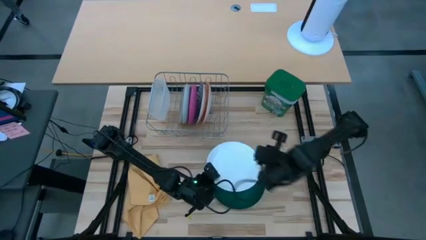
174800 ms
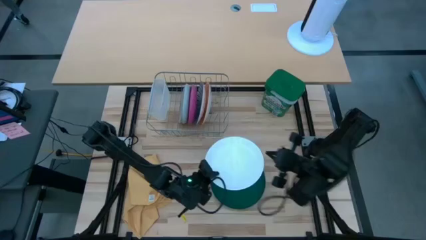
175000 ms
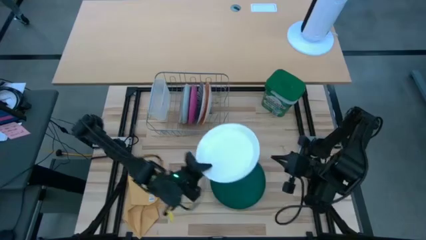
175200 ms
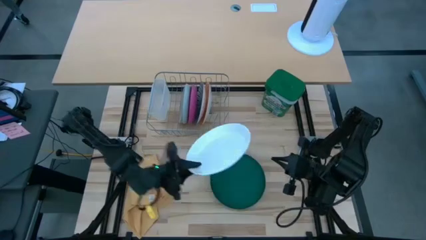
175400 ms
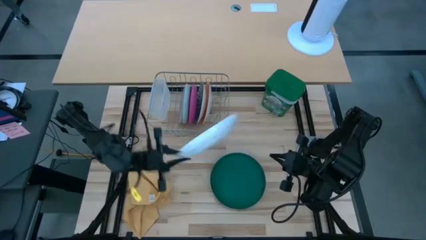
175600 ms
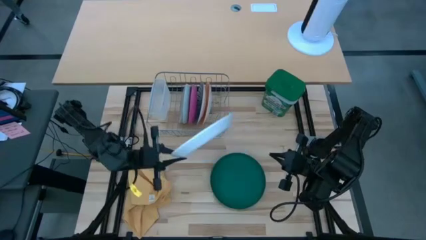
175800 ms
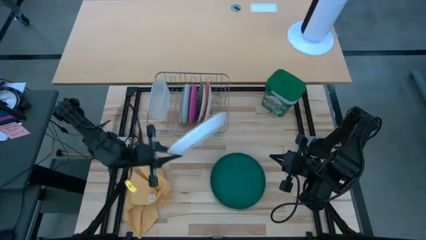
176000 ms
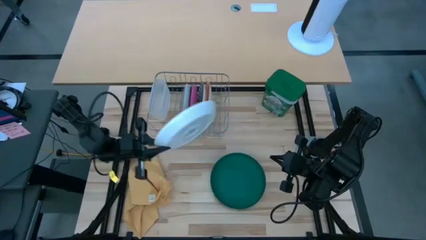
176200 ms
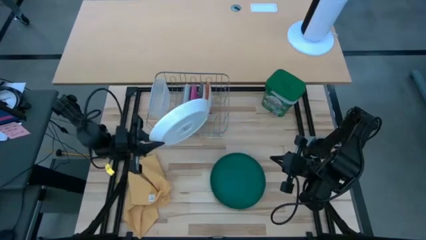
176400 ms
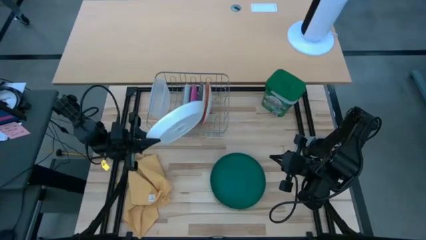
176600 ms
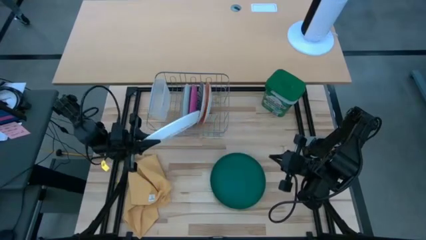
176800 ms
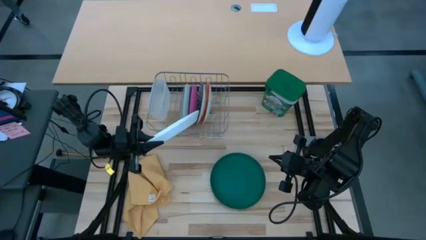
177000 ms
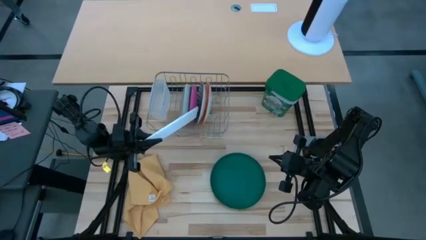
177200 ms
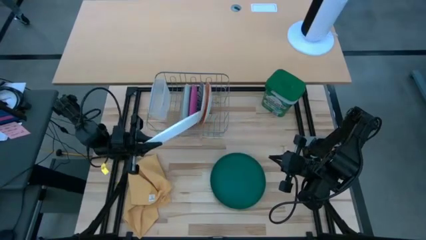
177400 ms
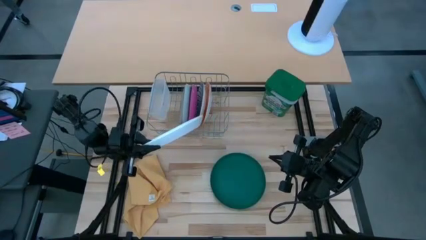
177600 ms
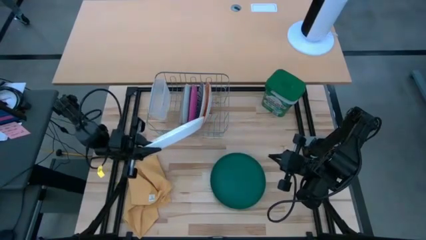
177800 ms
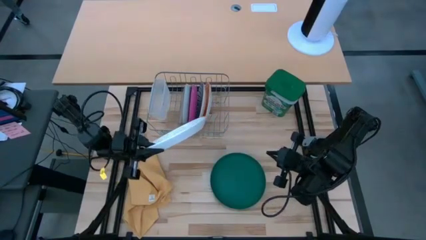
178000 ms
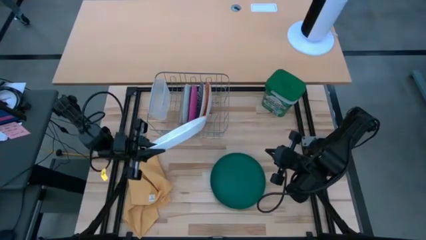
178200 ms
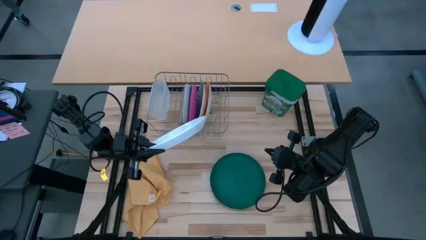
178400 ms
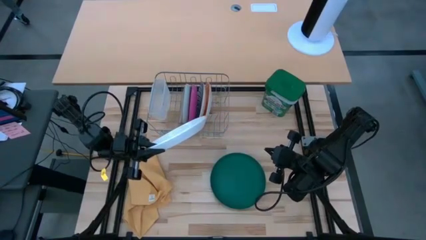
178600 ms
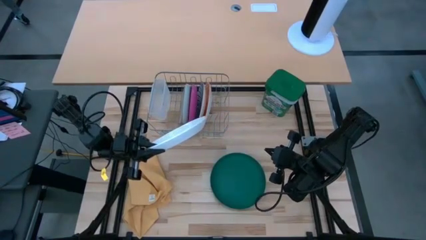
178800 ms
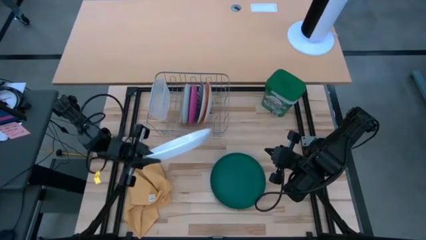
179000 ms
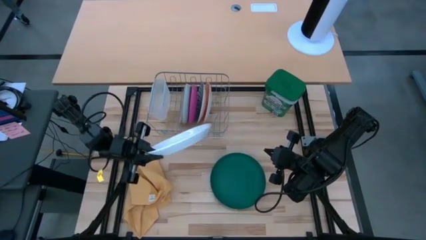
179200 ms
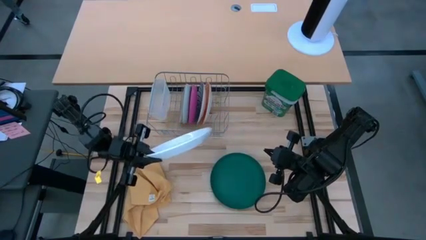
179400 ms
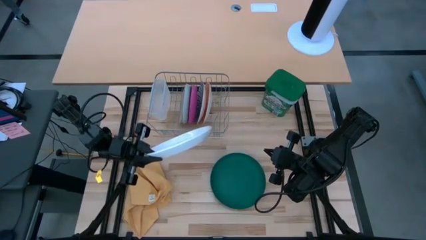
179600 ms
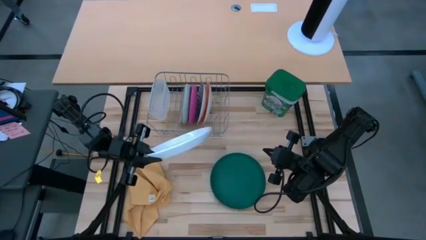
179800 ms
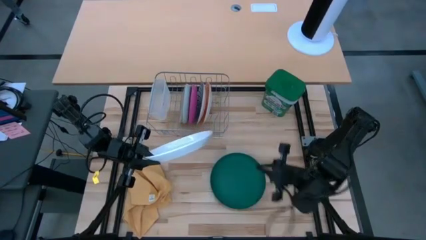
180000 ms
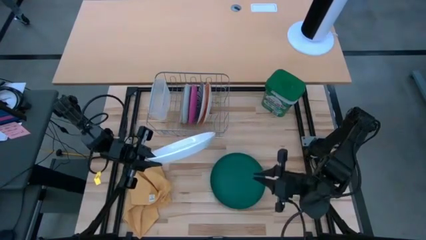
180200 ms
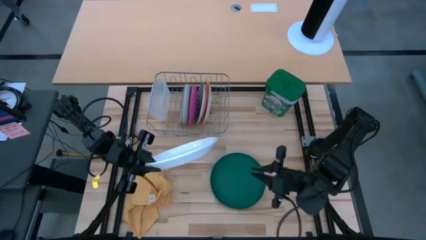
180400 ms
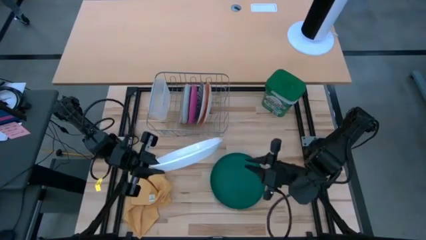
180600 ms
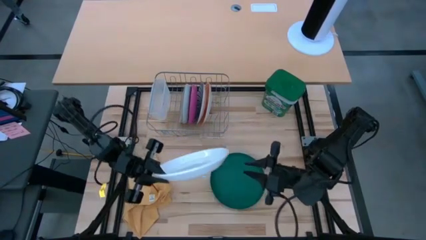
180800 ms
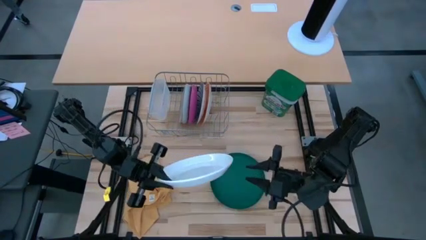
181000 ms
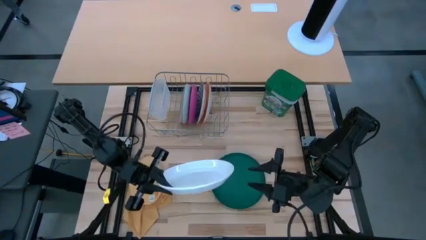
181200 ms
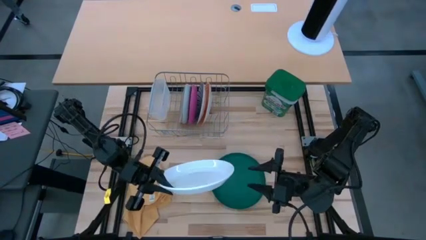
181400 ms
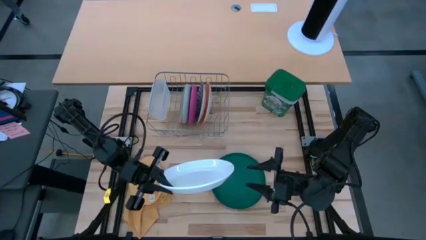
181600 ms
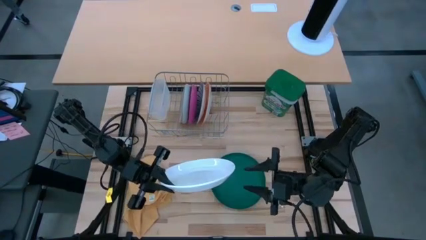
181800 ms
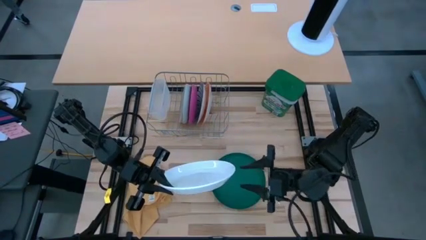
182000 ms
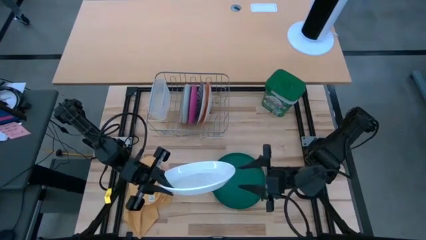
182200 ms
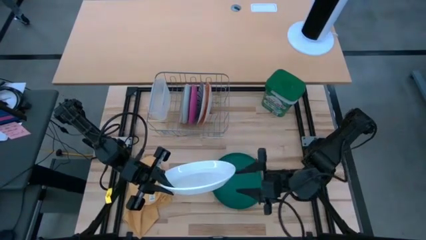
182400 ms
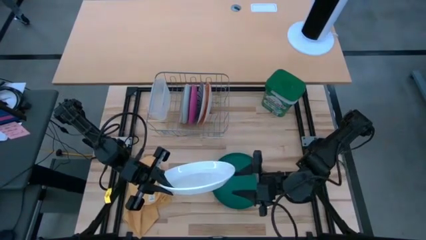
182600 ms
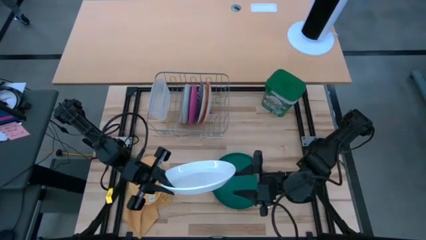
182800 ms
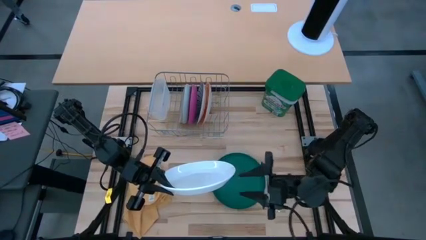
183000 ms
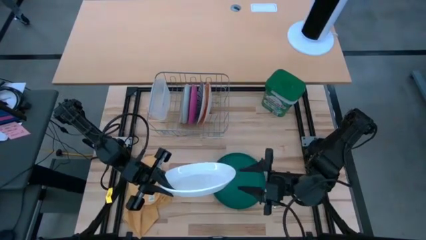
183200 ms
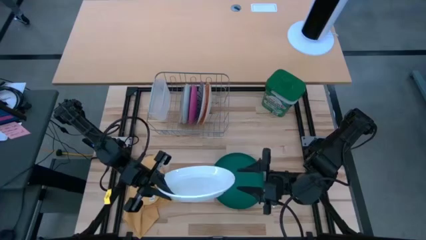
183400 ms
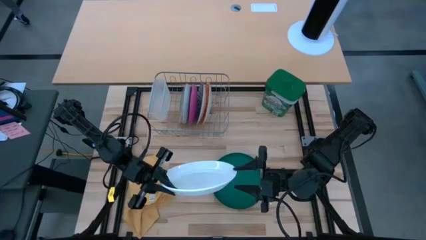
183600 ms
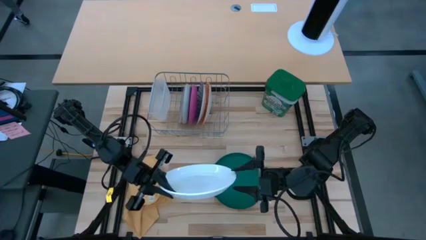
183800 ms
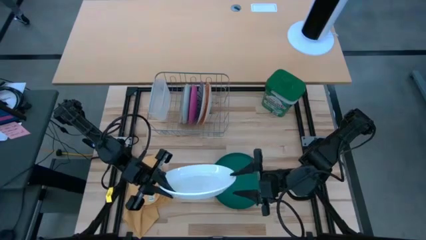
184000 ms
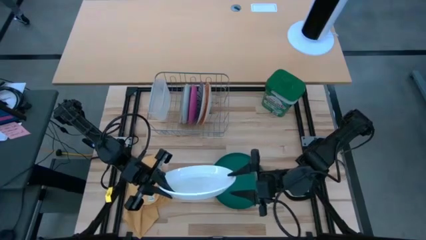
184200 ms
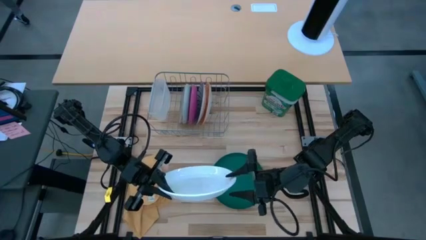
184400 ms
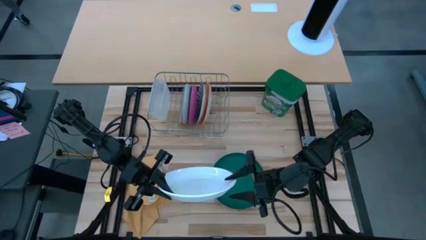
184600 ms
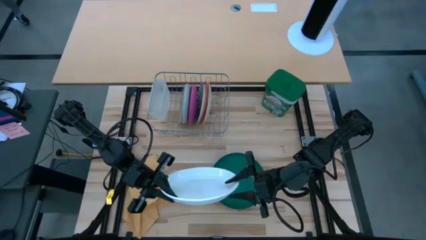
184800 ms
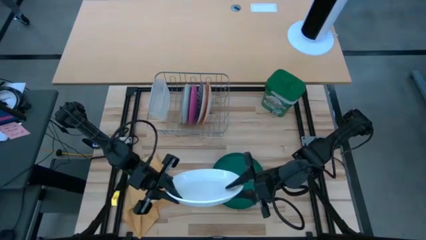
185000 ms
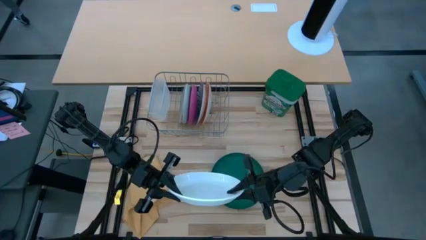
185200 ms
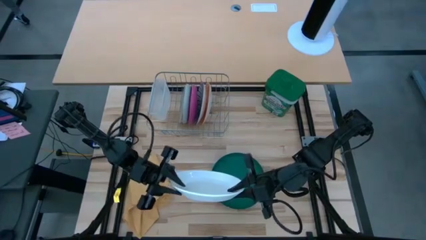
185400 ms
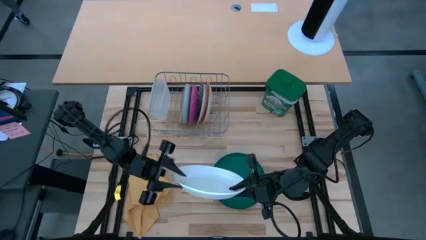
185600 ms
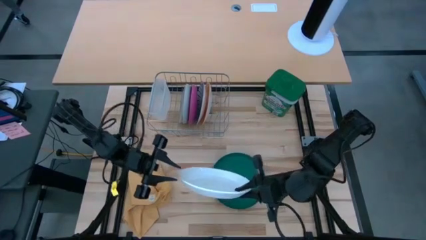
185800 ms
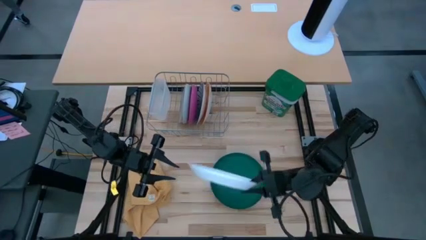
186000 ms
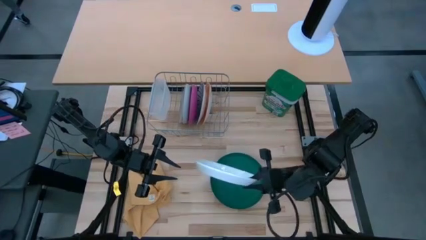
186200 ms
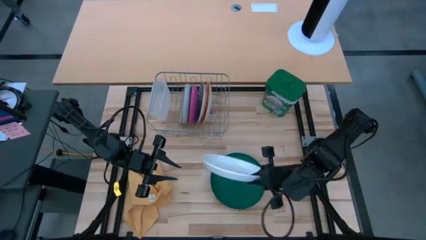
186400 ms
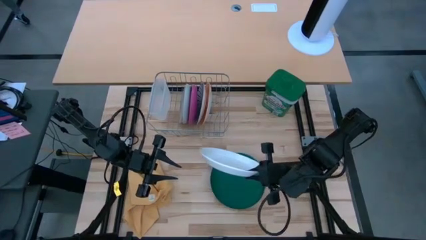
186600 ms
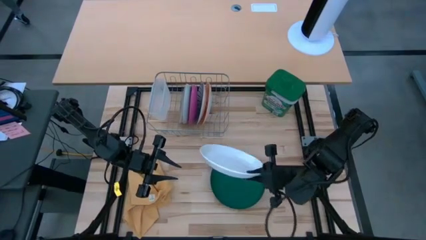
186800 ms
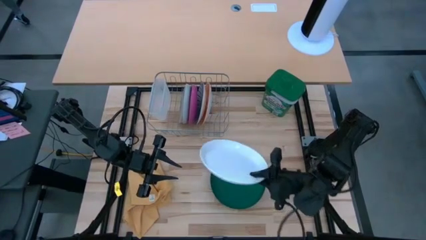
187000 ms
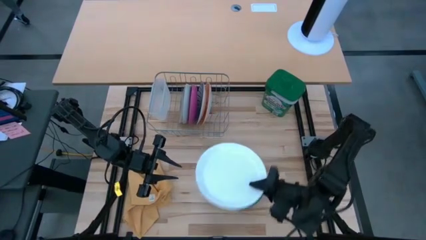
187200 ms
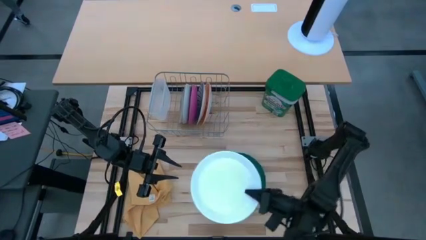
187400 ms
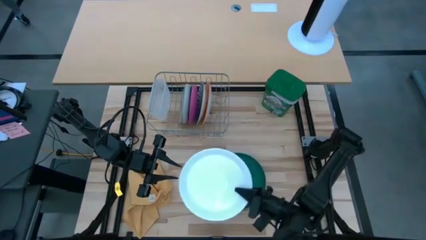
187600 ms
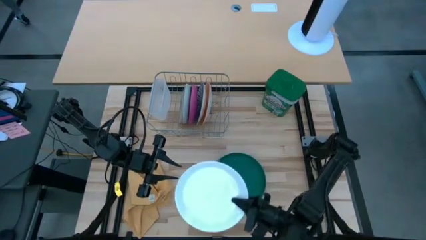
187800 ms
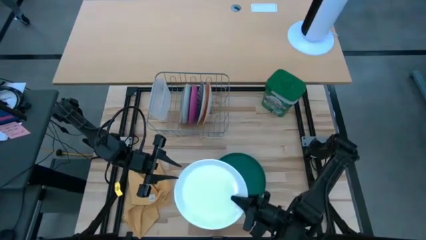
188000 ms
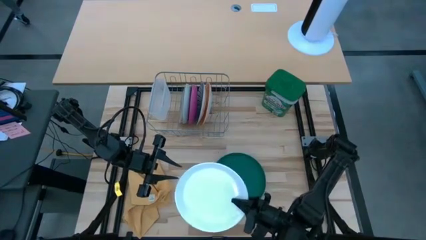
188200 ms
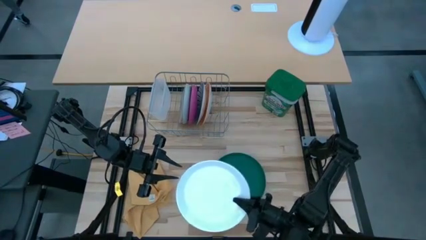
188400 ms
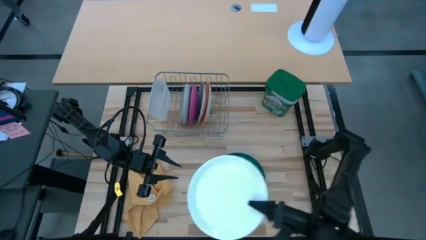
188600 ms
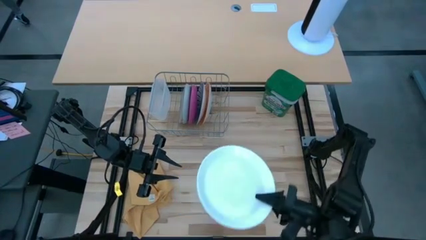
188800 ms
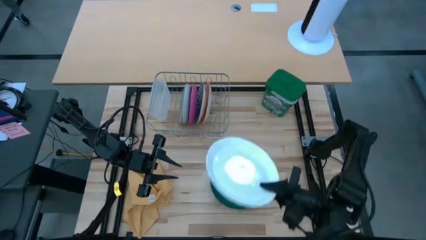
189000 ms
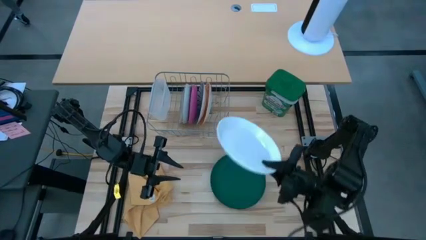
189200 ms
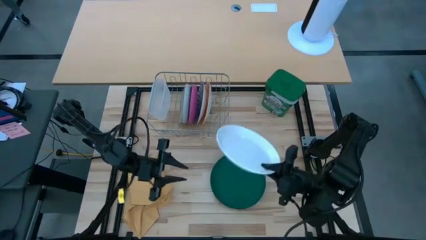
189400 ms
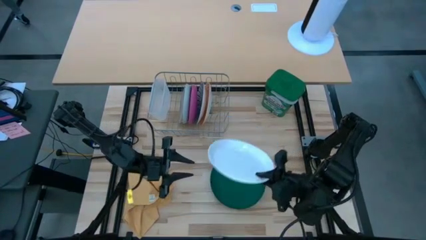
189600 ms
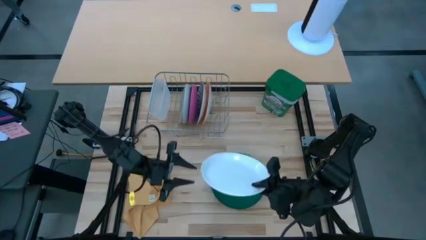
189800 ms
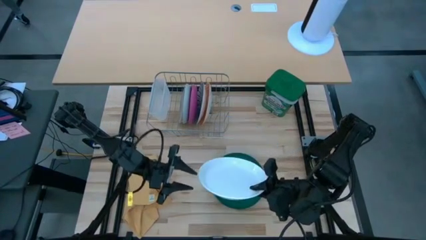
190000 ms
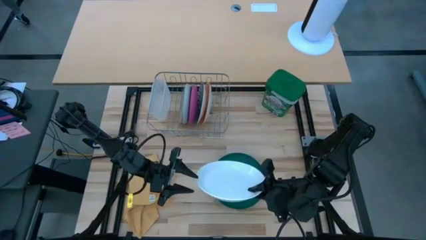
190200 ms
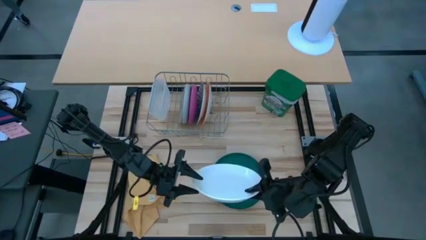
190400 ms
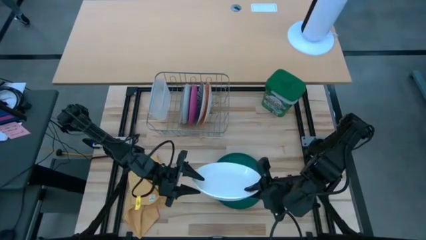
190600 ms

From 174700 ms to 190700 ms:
Task: Sort dishes
Put the white plate into the dish rack

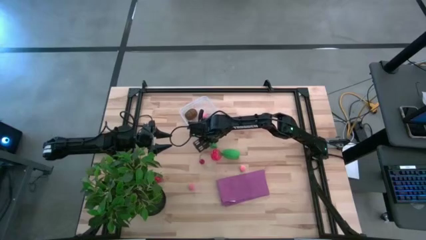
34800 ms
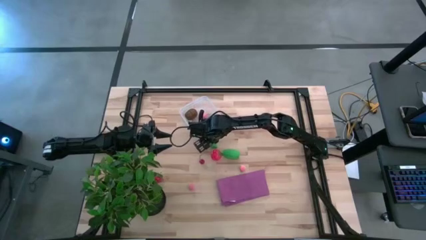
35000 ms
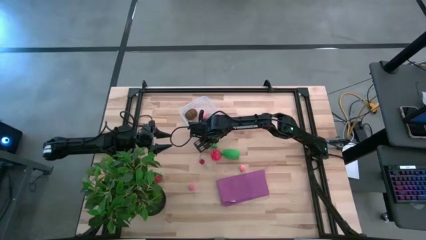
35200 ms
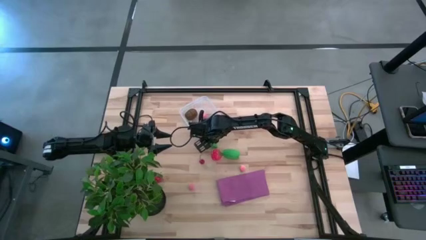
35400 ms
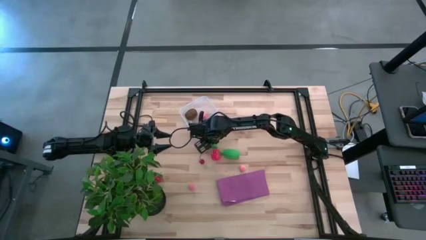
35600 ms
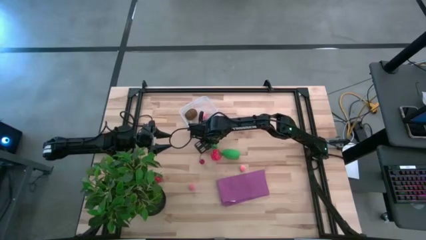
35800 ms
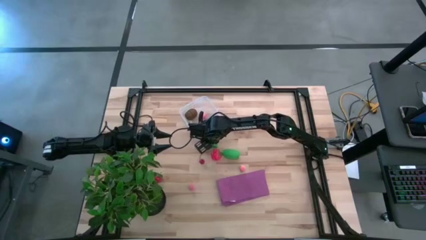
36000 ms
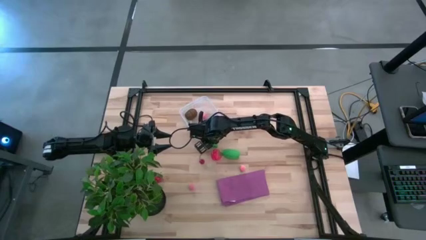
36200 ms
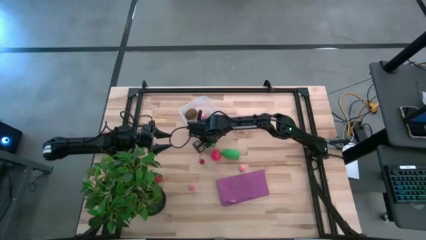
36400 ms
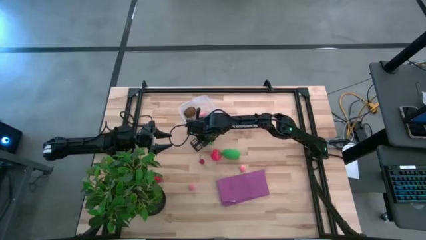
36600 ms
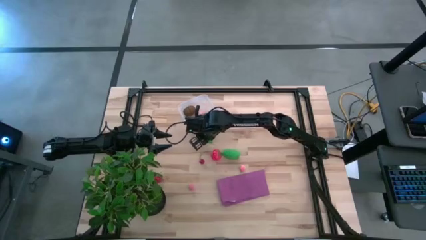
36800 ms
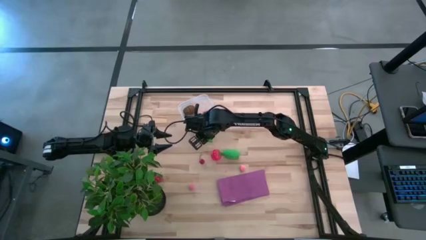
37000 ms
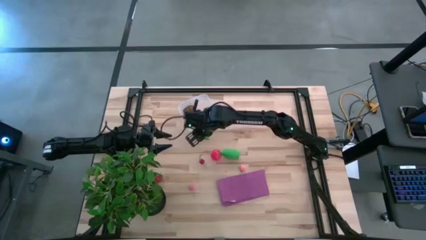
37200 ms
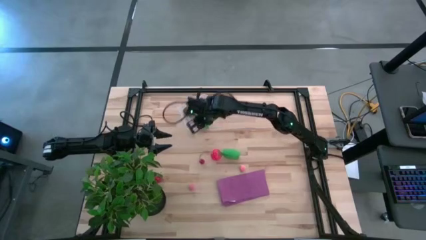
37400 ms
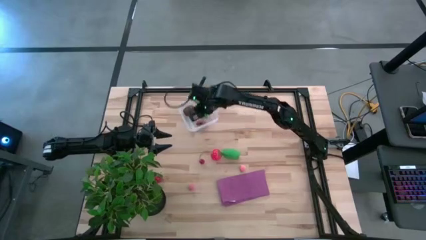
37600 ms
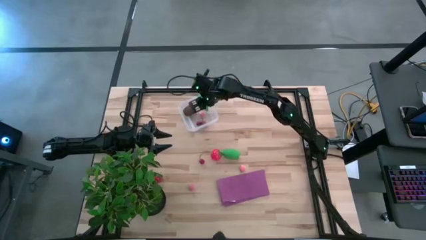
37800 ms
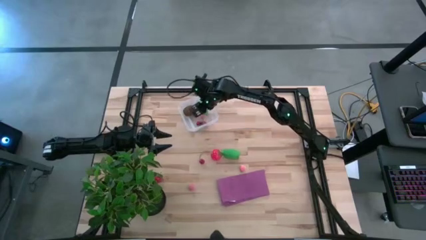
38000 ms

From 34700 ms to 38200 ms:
Task: Pick and placing Produce into tupperware
Put the green peas into the transparent bin
